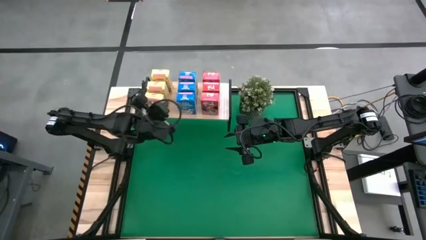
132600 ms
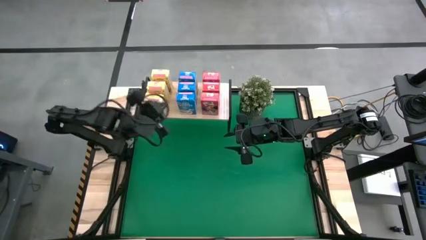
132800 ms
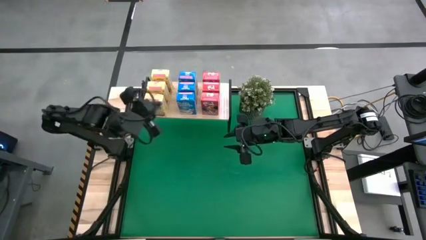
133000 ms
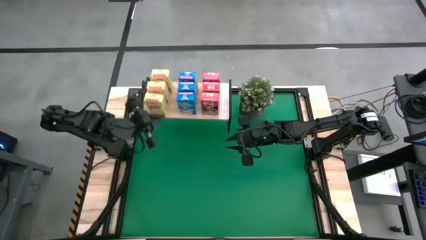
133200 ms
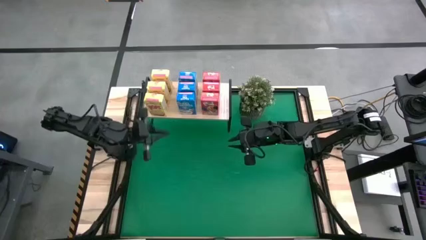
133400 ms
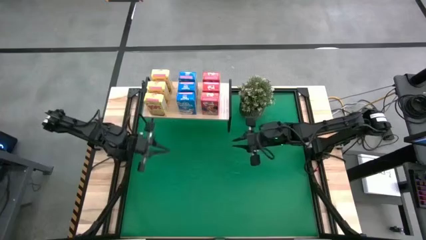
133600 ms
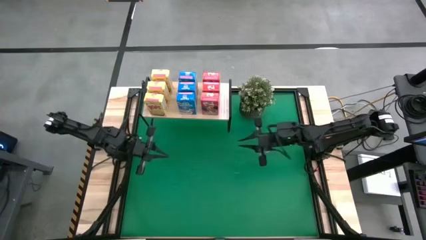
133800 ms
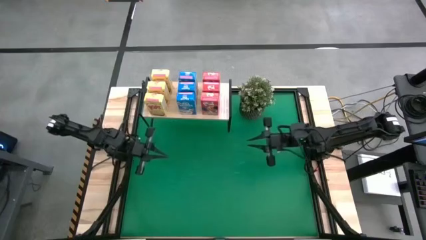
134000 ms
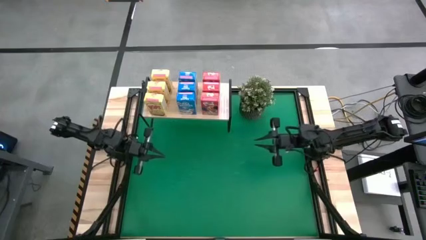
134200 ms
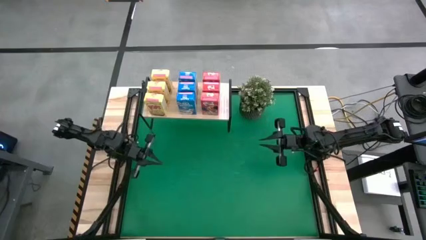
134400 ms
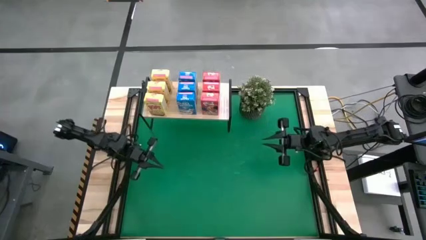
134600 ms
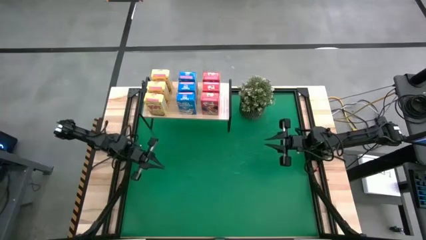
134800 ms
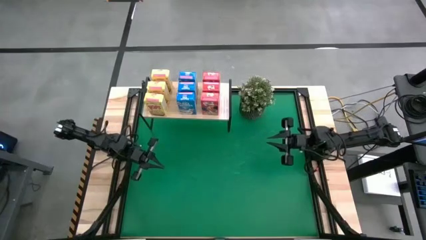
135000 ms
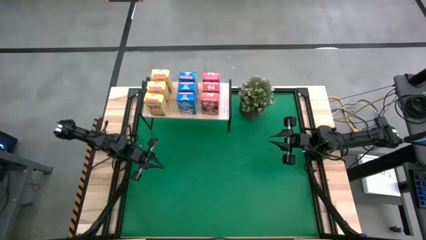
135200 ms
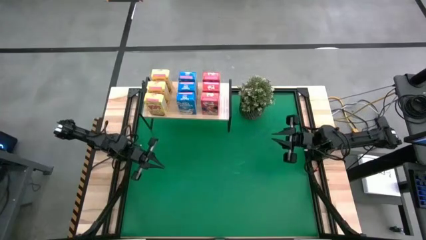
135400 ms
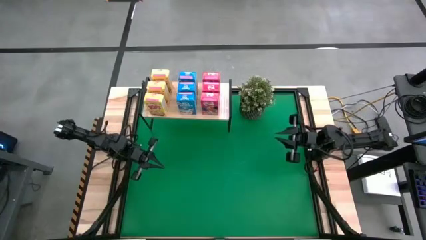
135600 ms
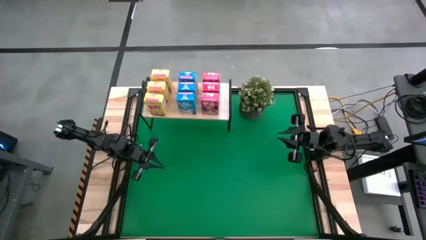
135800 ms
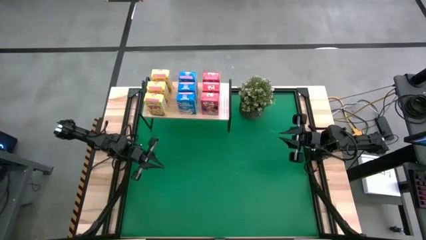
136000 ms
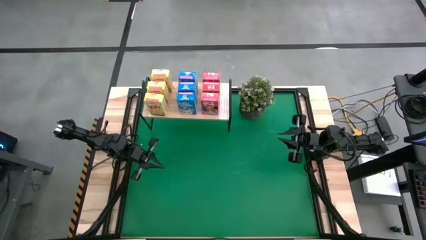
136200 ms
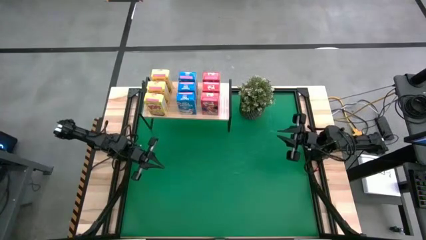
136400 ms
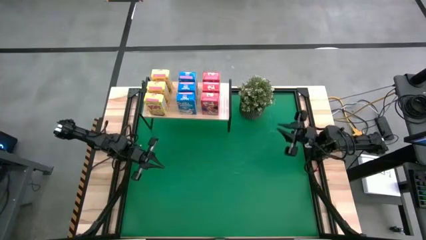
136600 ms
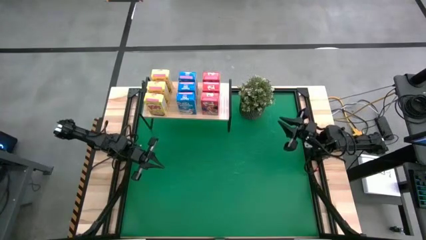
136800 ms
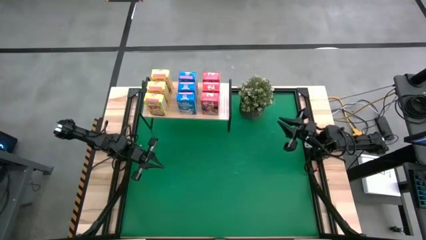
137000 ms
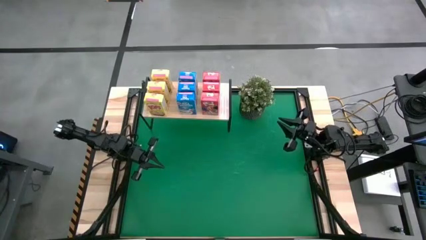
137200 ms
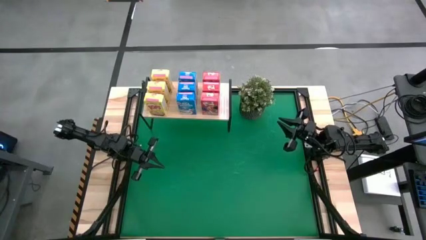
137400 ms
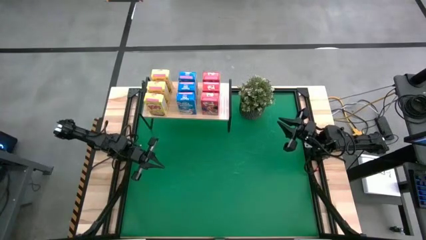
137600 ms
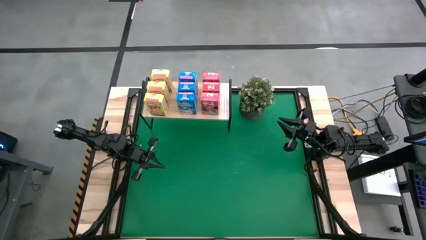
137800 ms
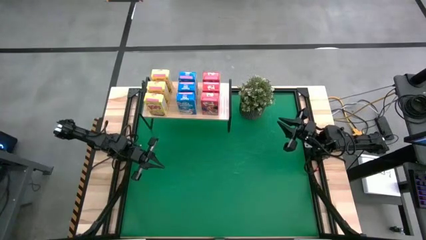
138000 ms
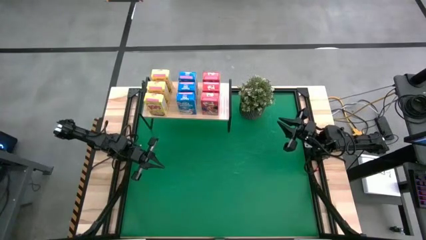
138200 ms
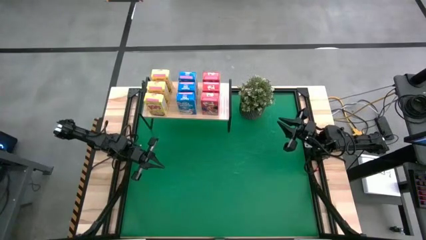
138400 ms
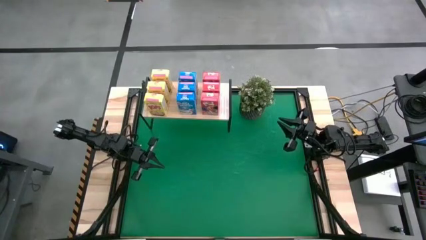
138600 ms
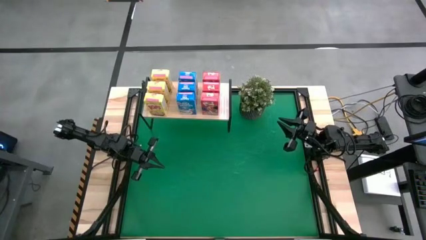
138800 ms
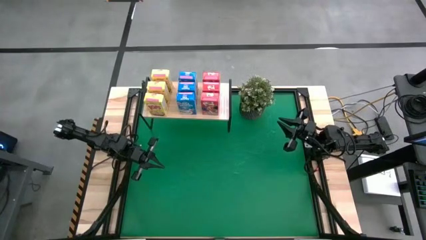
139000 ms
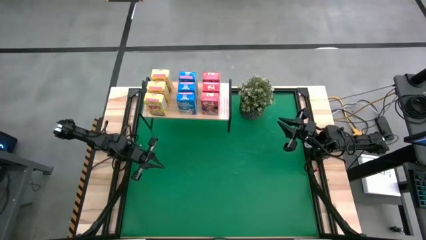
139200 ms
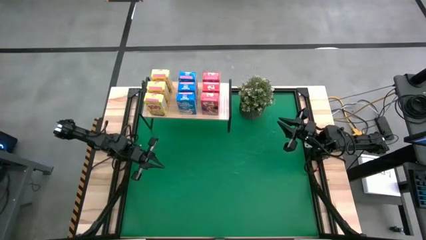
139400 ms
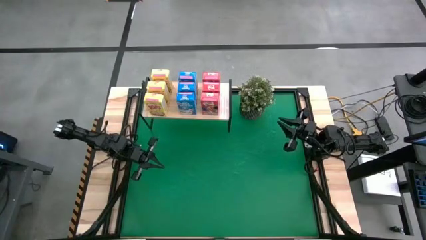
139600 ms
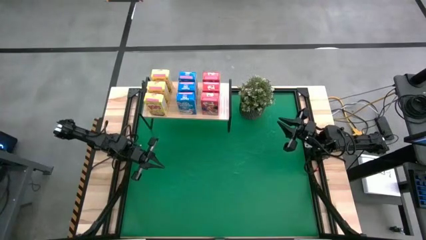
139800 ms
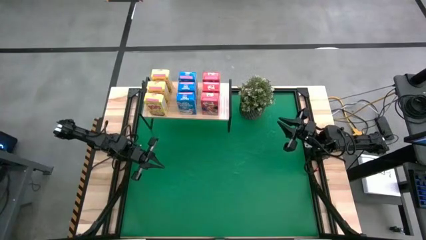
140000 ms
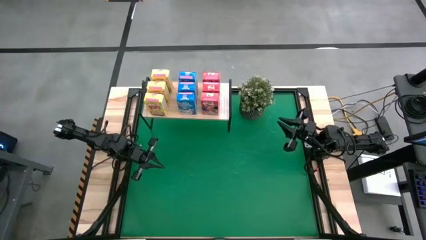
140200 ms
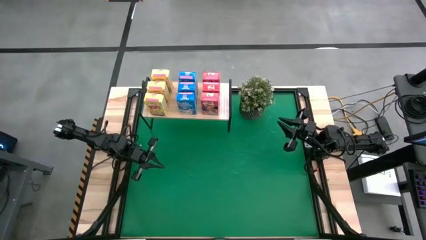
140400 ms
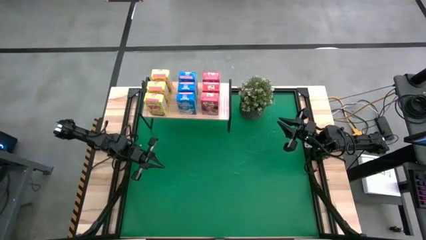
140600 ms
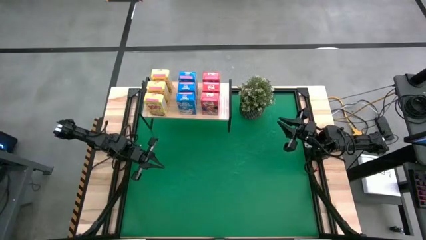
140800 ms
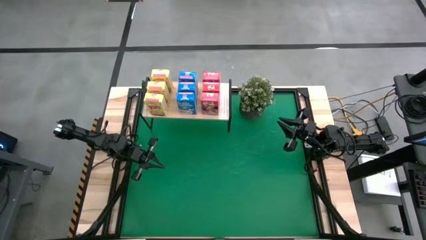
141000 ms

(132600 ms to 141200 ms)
Task: Stack cereal on shelf
Return to Home Position

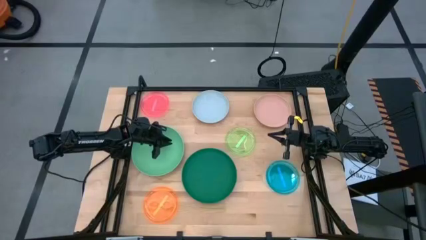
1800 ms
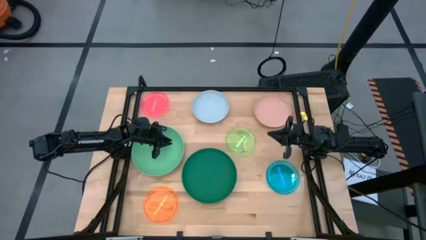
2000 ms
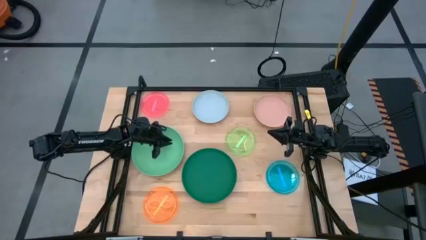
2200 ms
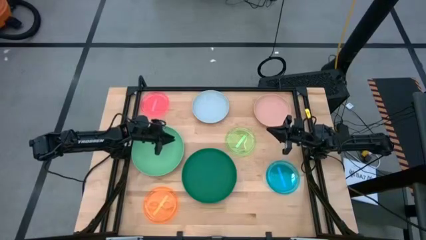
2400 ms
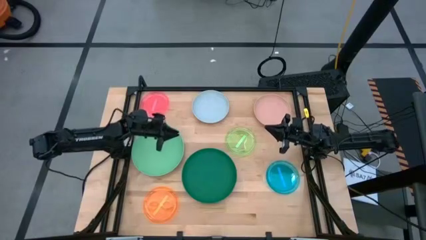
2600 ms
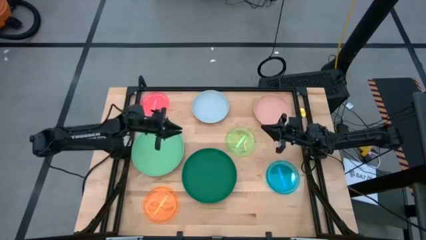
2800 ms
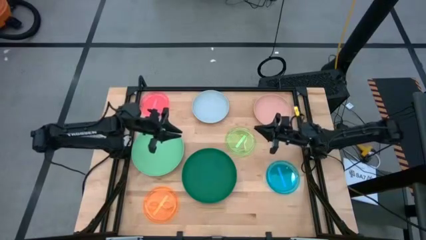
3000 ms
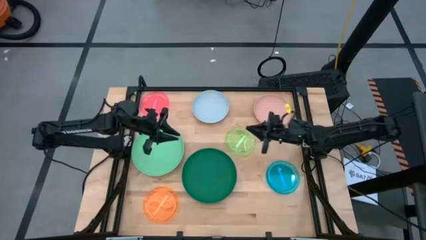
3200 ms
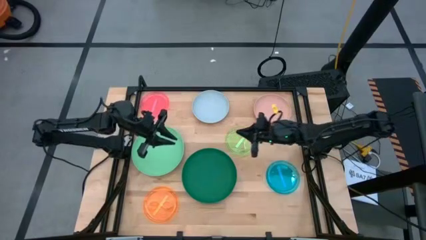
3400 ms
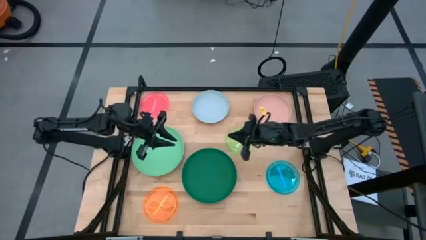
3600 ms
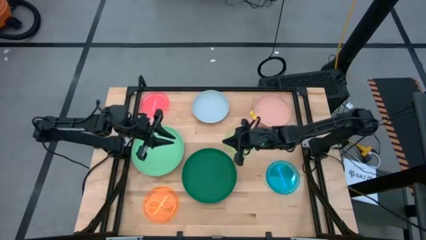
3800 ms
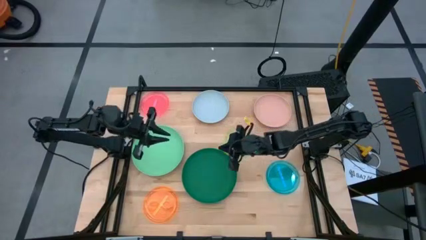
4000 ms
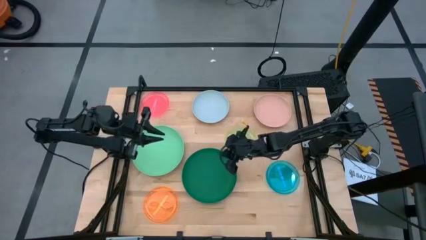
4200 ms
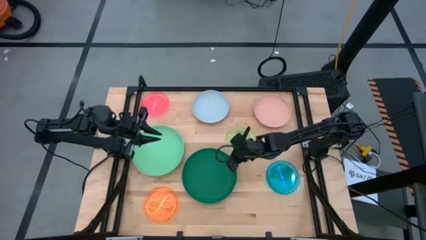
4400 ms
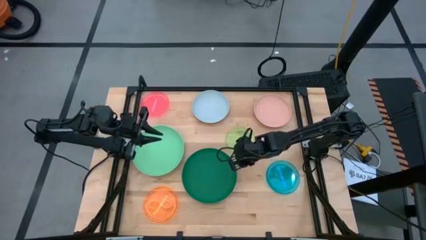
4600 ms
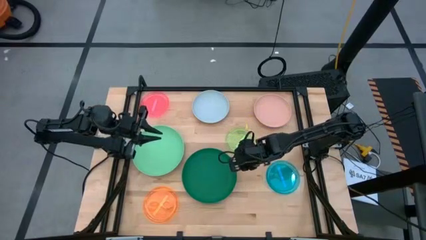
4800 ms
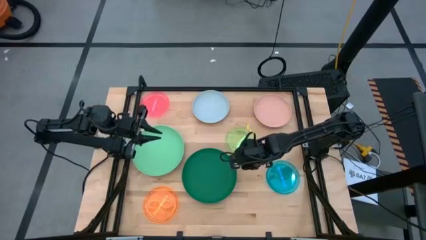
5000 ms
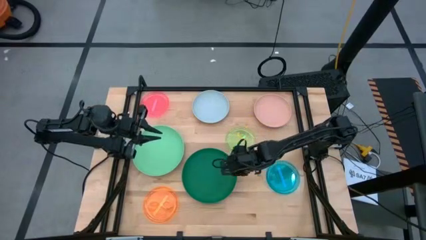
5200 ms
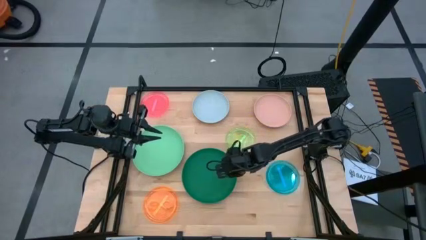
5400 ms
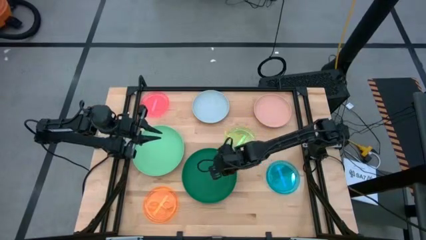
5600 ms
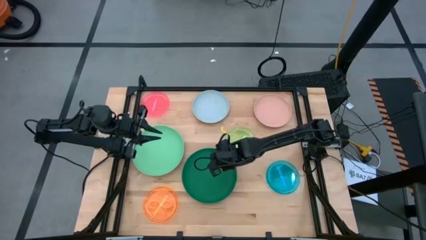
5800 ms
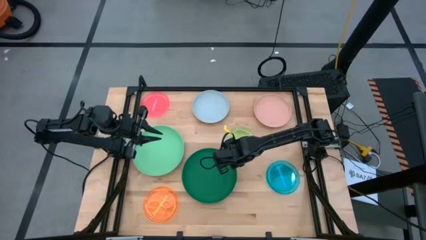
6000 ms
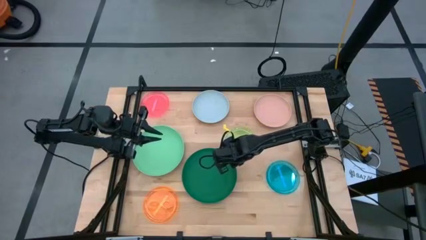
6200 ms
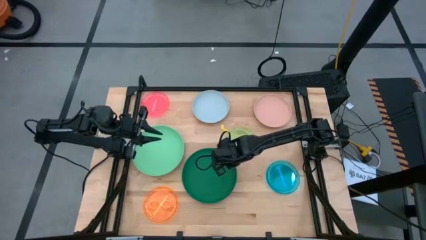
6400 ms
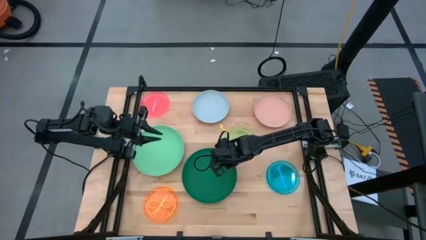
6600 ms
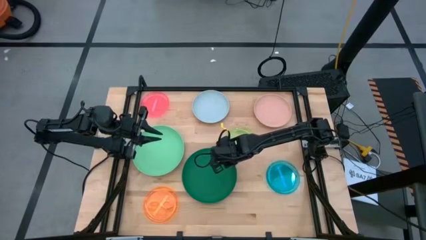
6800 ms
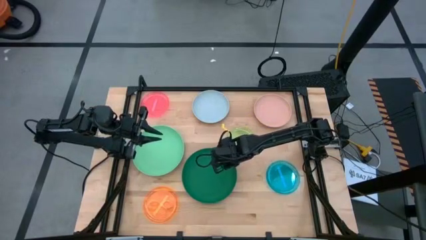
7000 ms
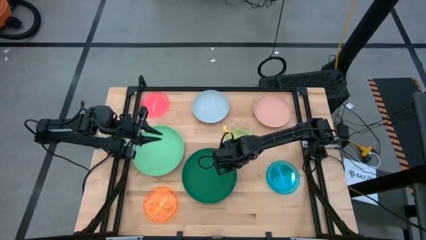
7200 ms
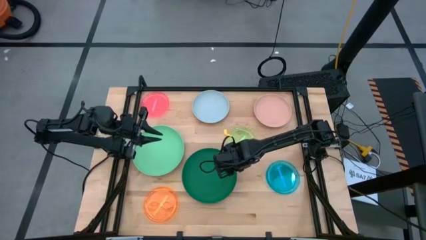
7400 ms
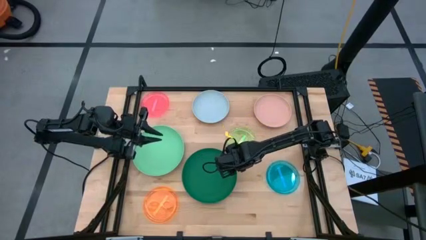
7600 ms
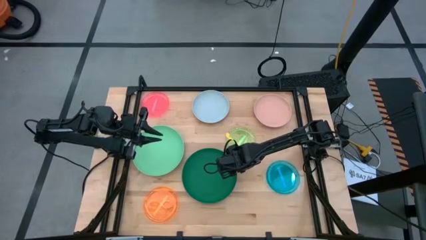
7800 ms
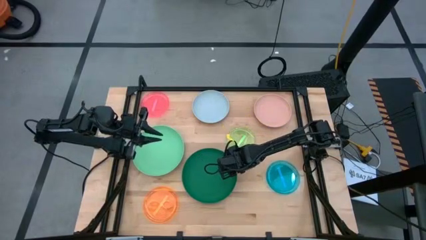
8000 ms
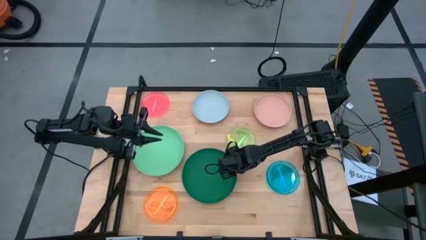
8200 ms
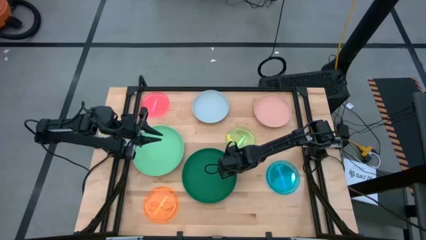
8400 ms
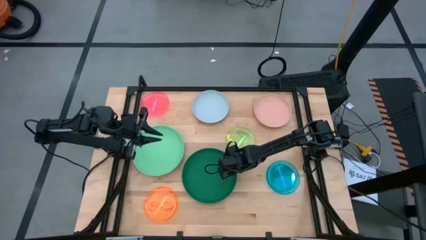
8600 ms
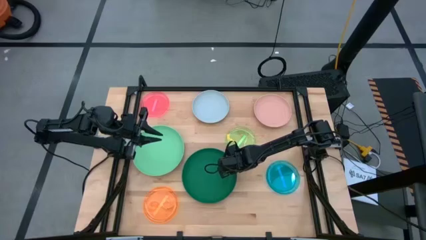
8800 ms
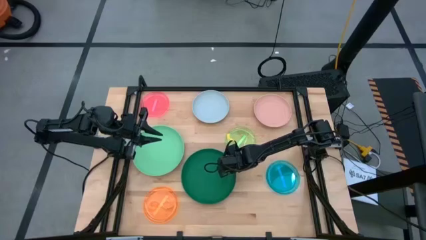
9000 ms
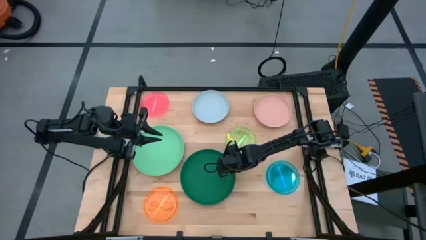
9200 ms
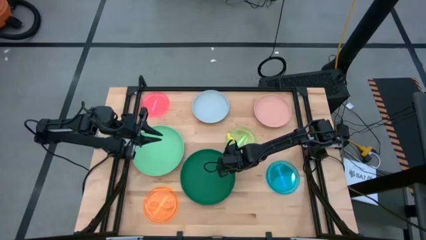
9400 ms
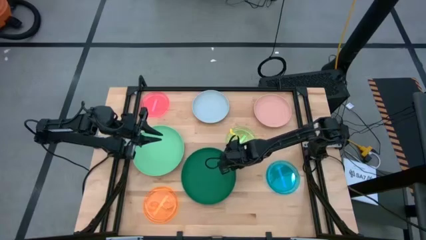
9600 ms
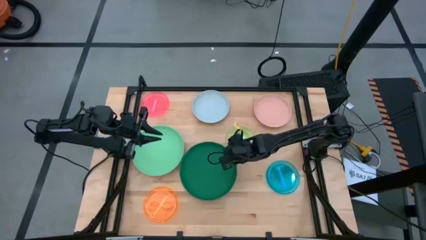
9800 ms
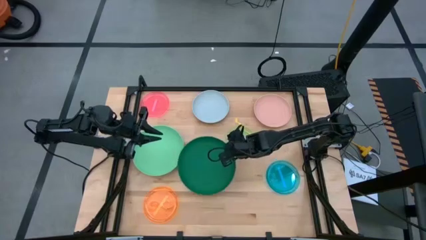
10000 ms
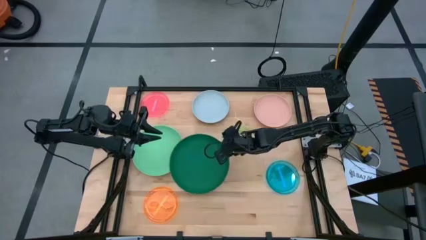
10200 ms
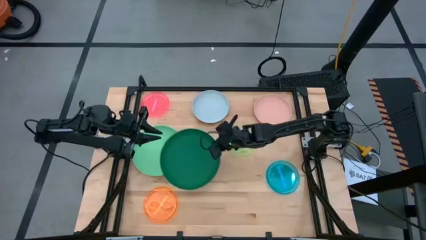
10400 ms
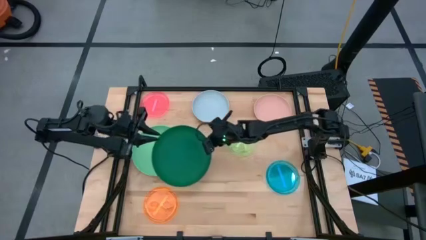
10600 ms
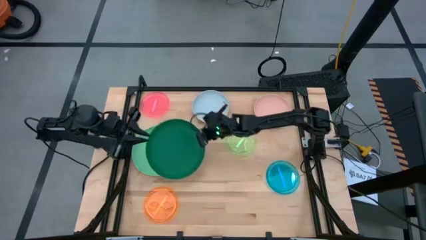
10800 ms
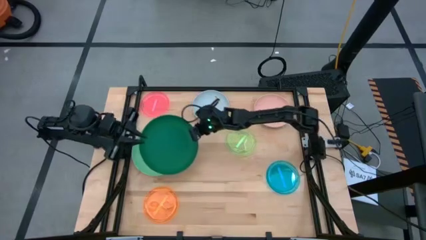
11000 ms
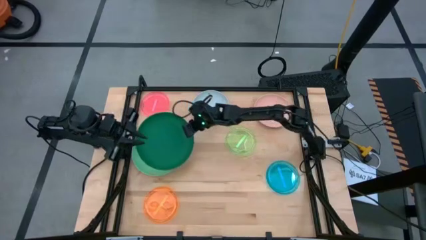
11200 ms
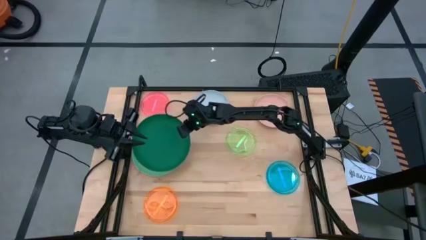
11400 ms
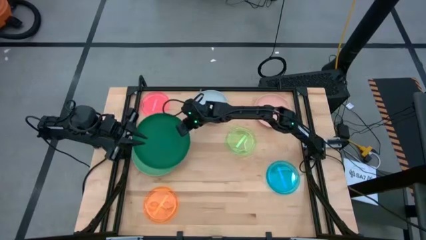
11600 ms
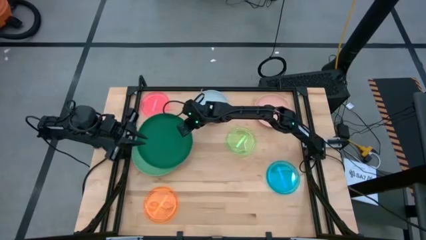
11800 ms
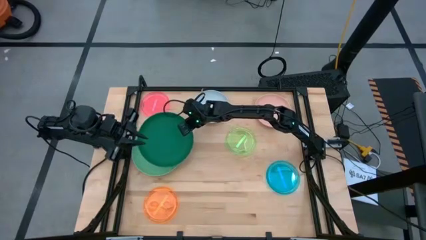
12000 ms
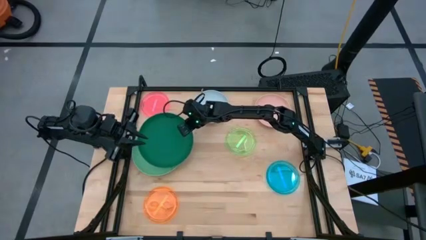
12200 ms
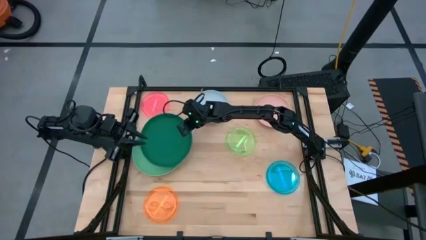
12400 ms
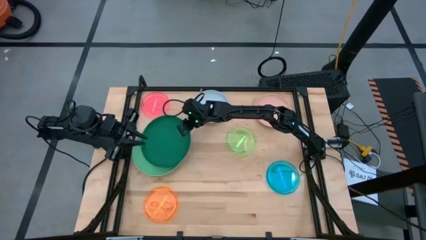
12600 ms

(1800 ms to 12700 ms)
Task: Stack plastic plates
Stack the darkgreen plate on top of the light green plate
